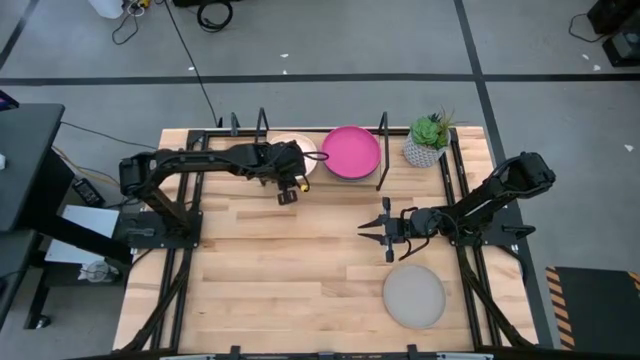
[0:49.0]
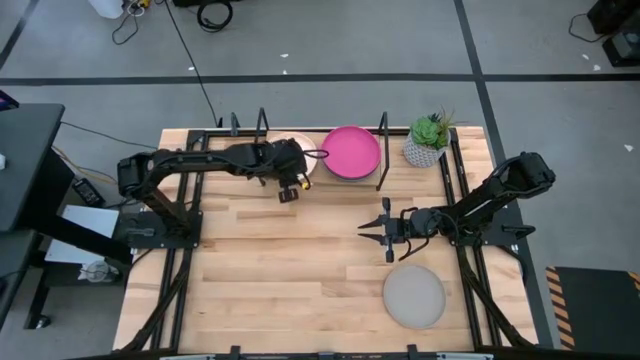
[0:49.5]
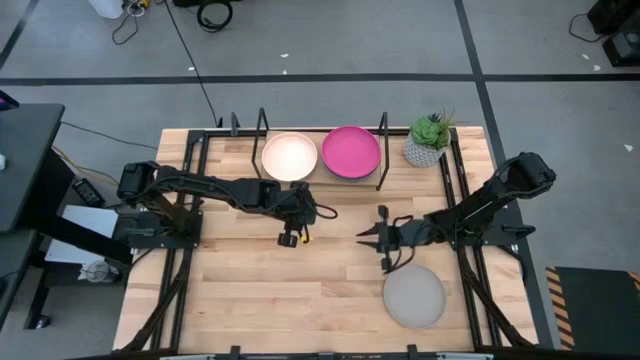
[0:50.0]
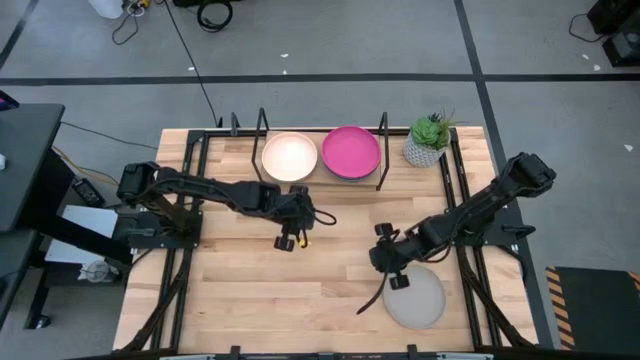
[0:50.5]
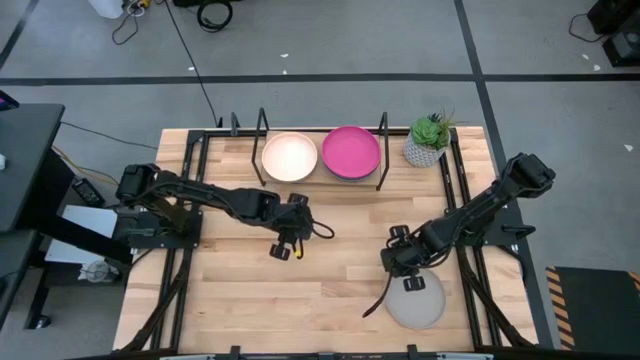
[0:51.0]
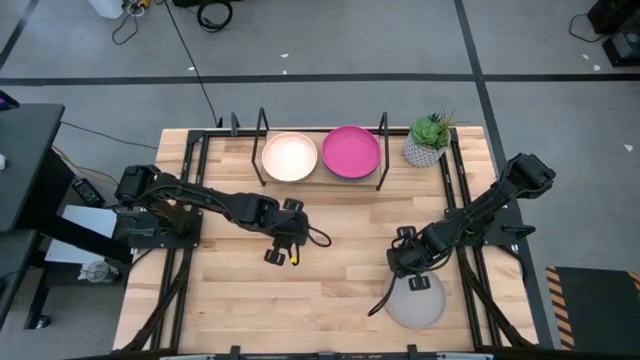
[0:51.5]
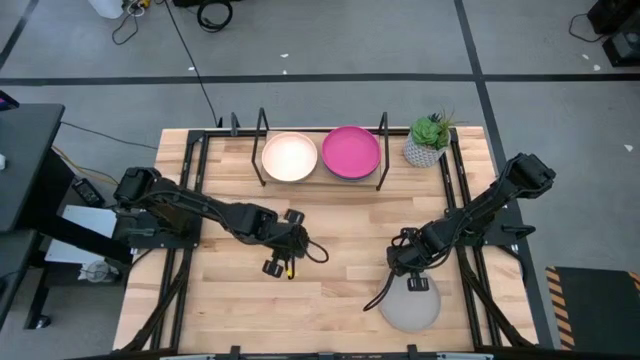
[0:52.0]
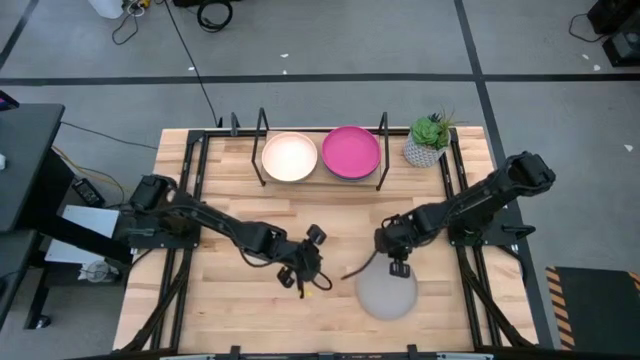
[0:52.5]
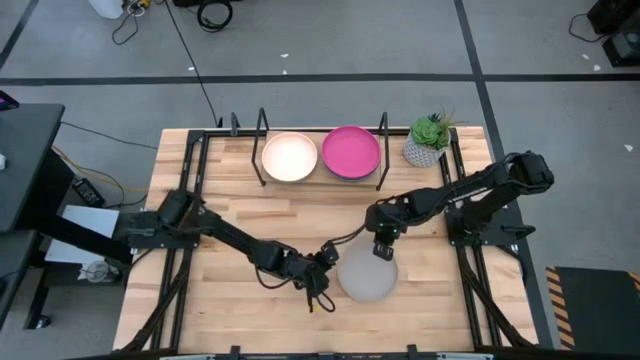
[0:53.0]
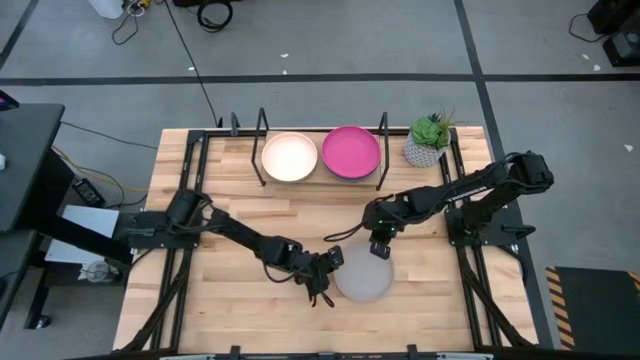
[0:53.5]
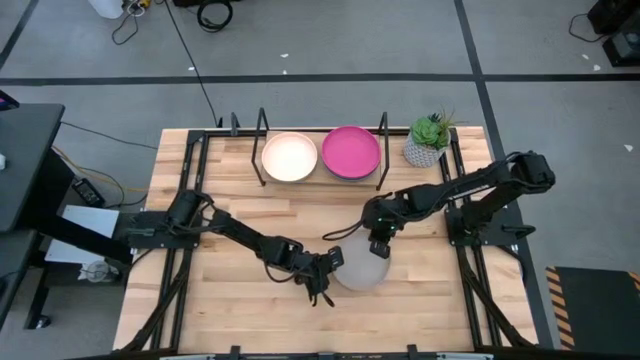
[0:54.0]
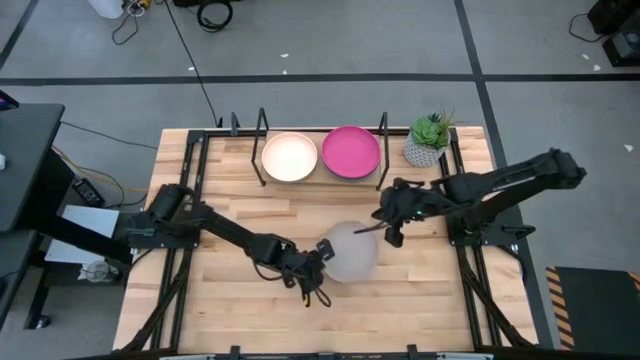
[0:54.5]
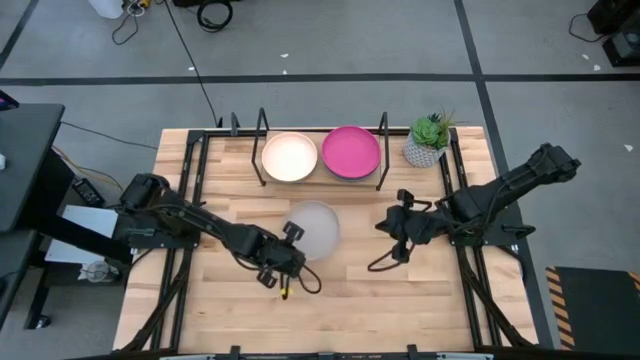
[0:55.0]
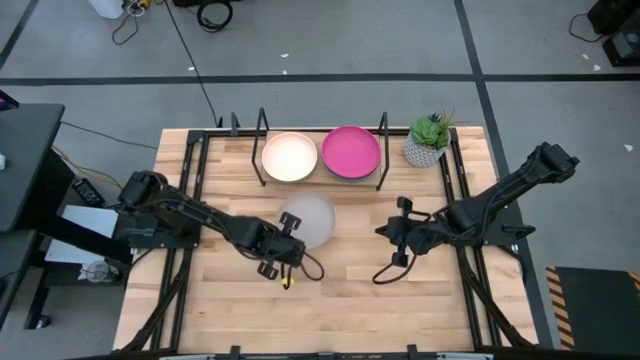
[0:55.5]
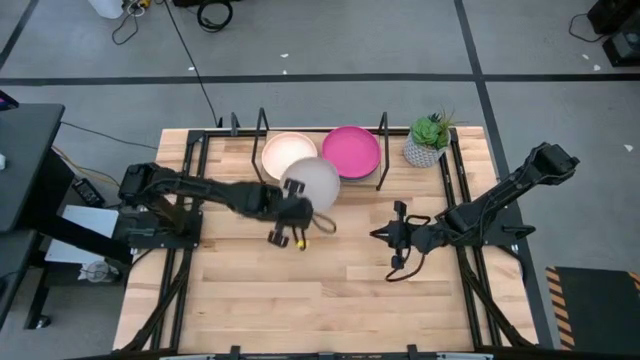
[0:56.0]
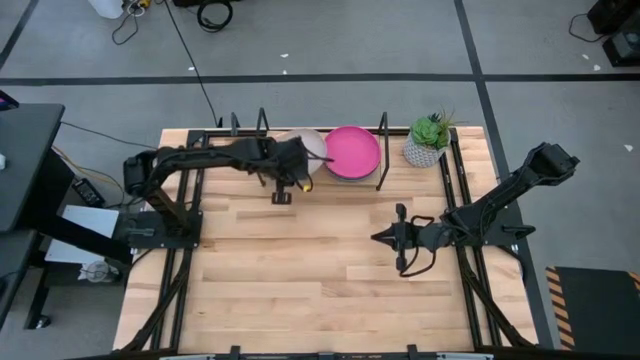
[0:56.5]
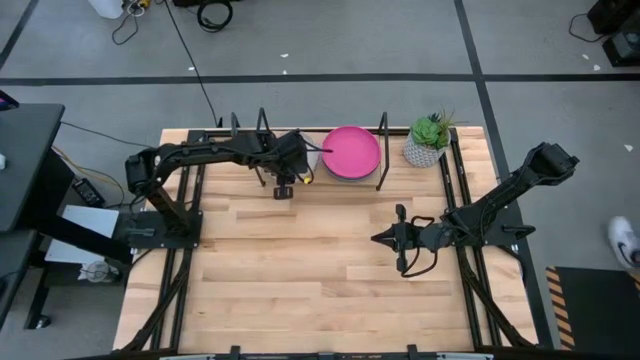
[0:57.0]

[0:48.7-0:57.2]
Task: Place and stack plates onto a shelf
Stack the gray plate onto the white plate

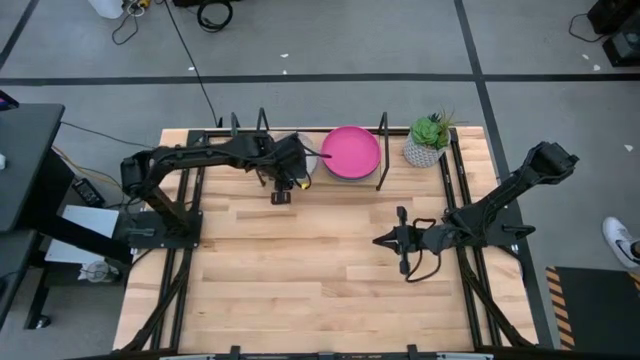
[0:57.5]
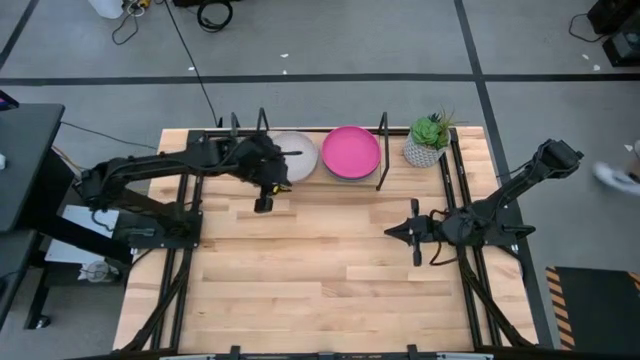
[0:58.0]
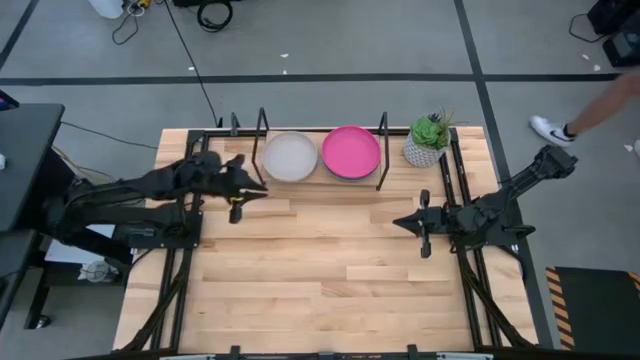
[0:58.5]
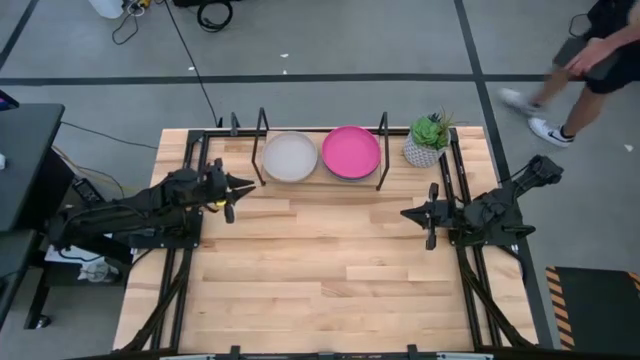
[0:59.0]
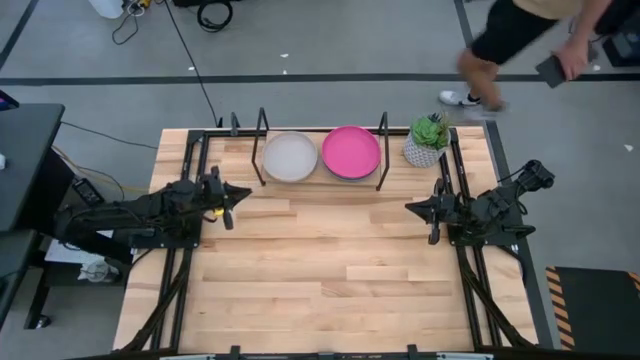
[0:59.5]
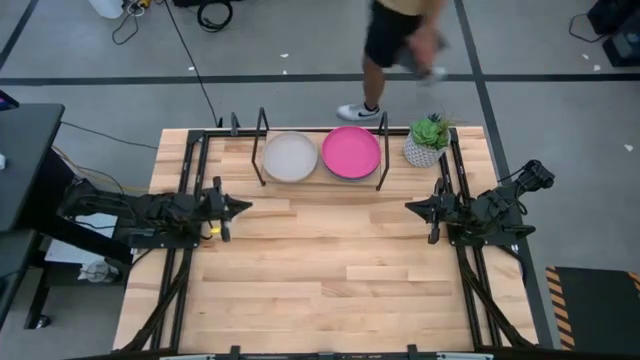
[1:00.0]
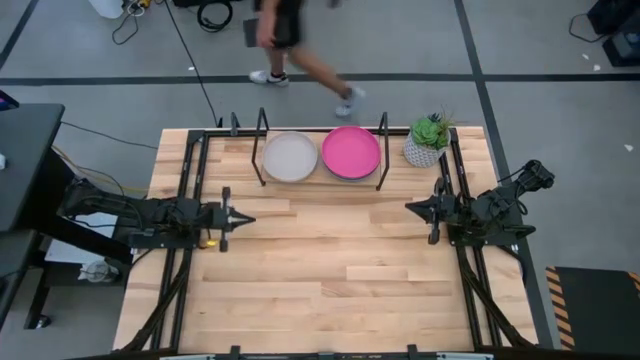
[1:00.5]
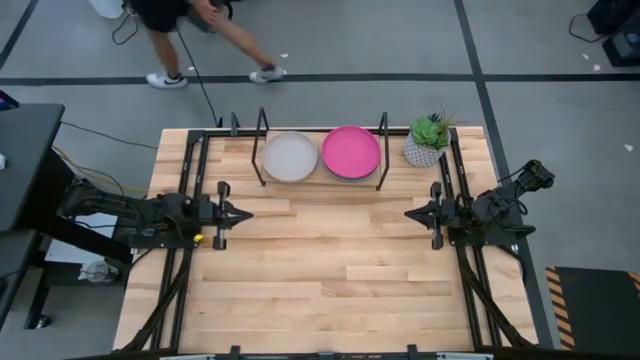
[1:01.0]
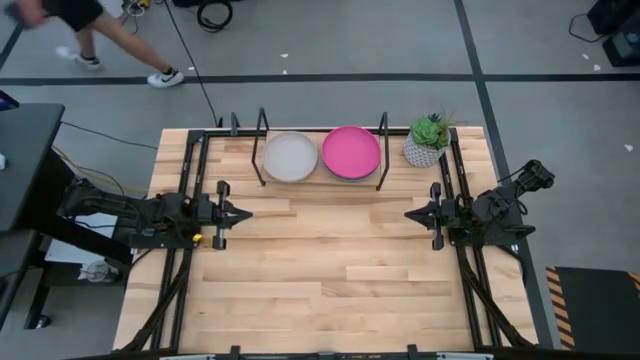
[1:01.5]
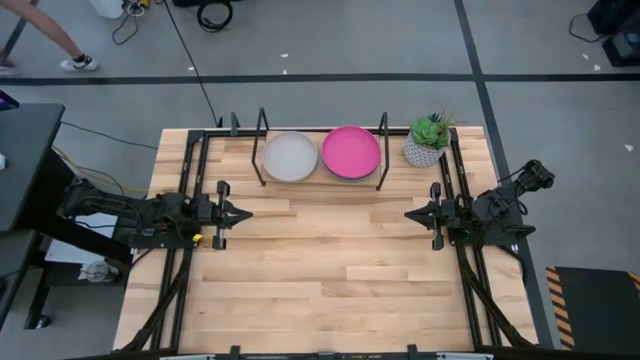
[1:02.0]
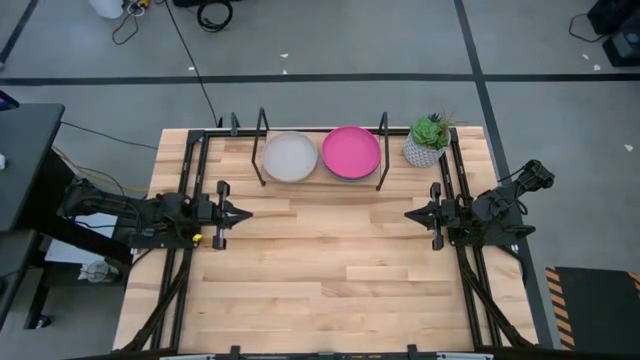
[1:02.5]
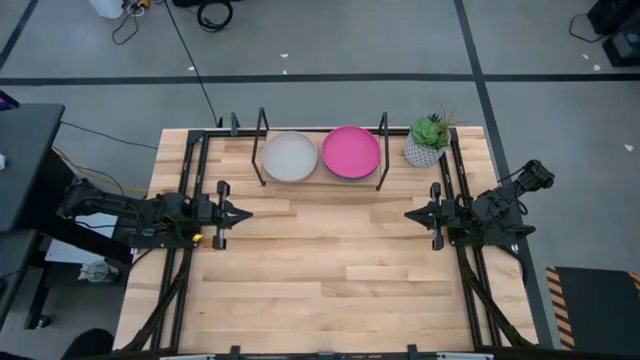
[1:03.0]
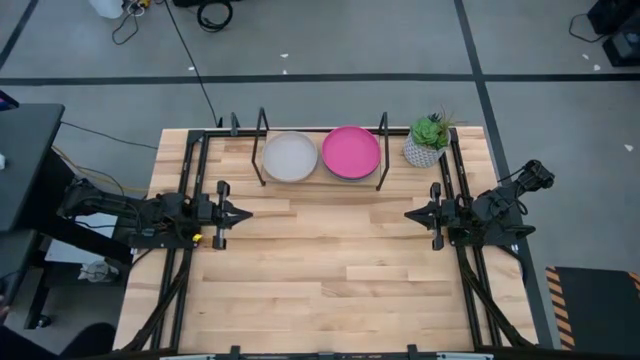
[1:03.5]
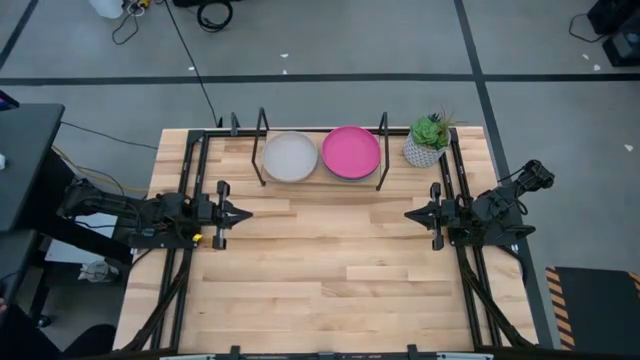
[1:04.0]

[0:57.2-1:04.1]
Return to Home Position

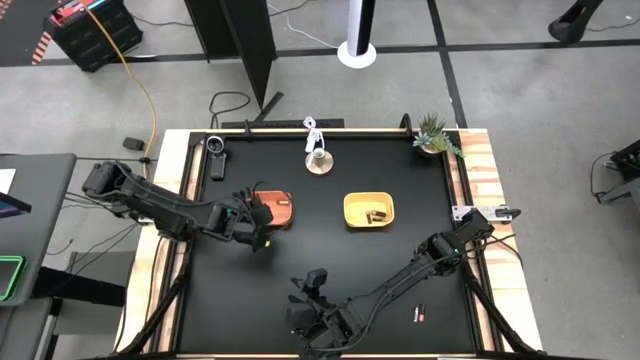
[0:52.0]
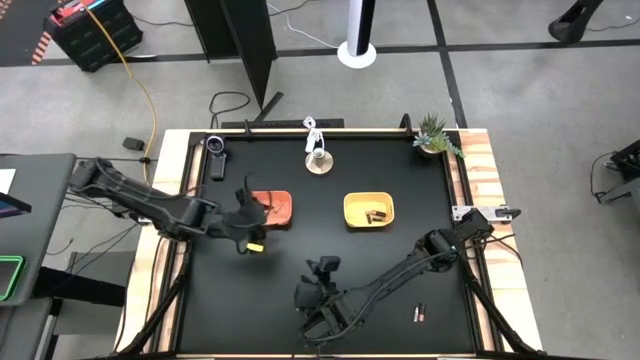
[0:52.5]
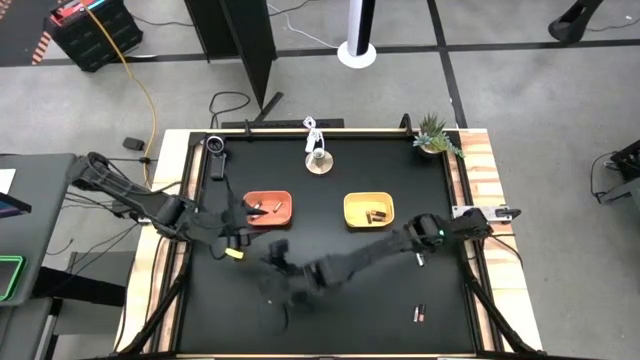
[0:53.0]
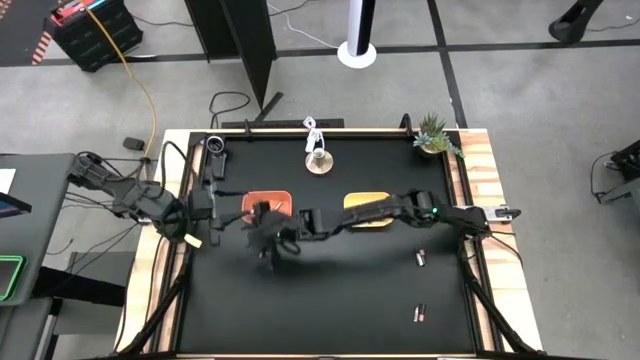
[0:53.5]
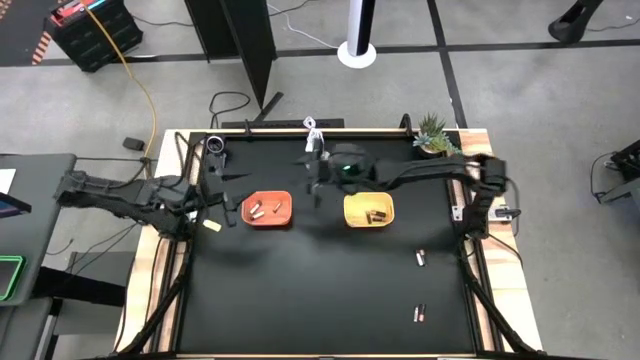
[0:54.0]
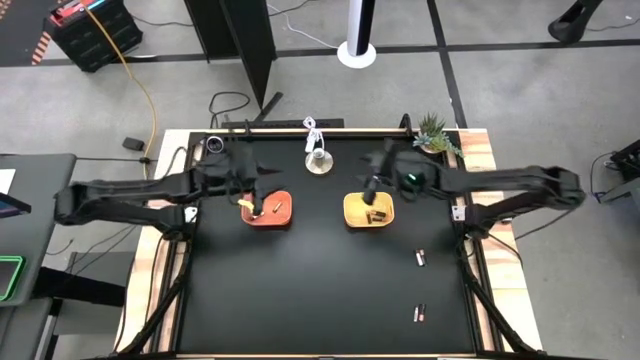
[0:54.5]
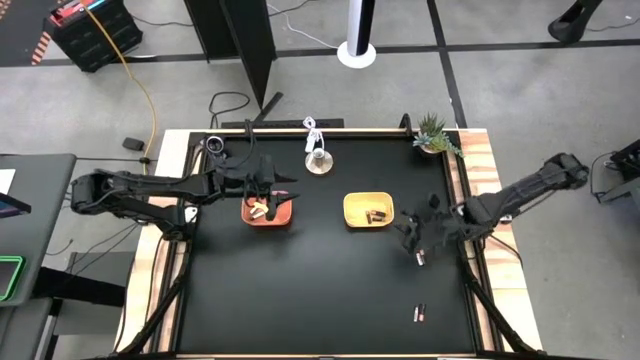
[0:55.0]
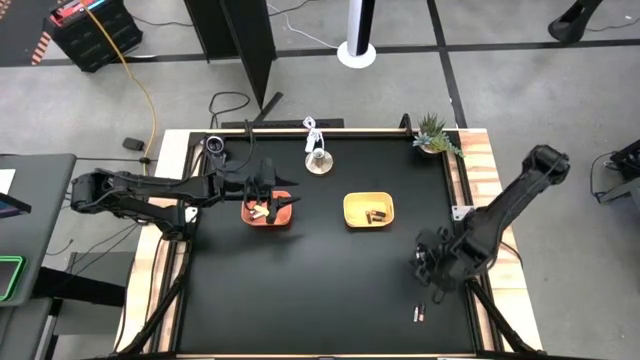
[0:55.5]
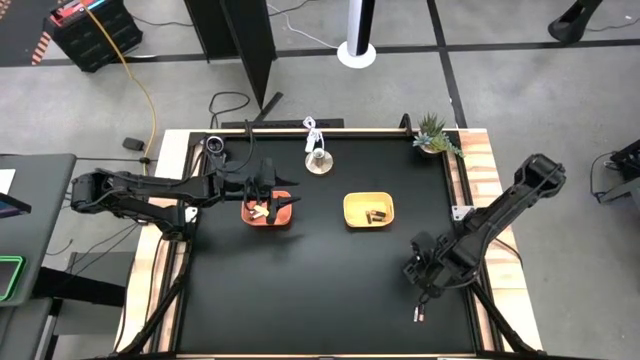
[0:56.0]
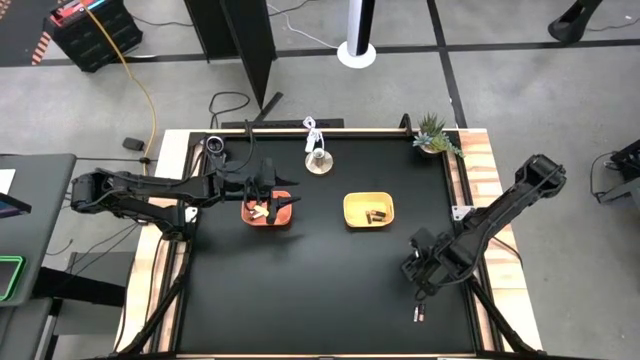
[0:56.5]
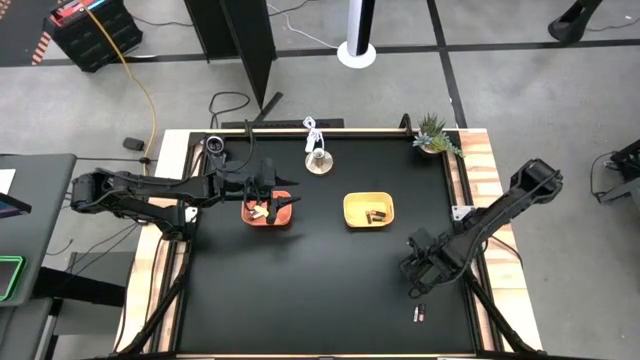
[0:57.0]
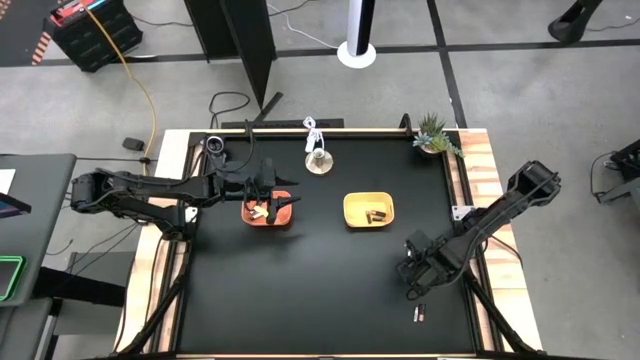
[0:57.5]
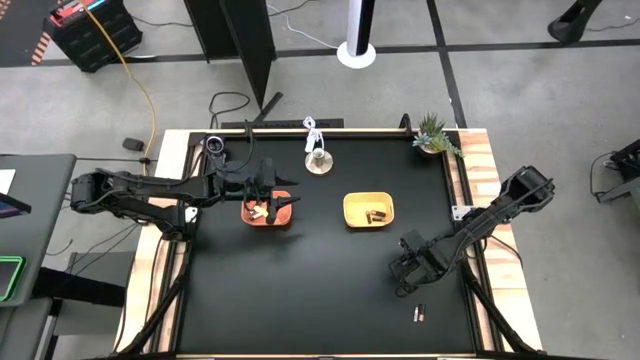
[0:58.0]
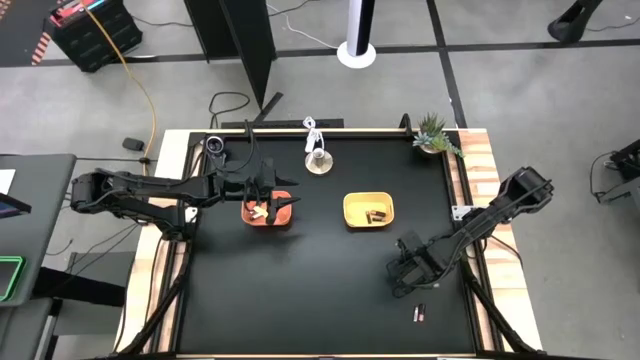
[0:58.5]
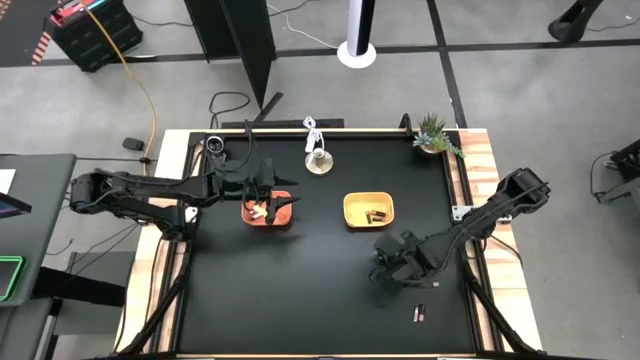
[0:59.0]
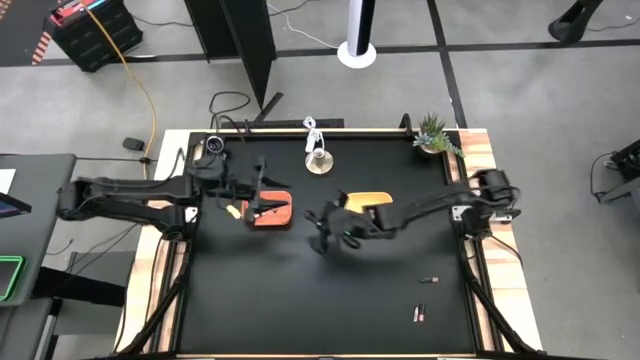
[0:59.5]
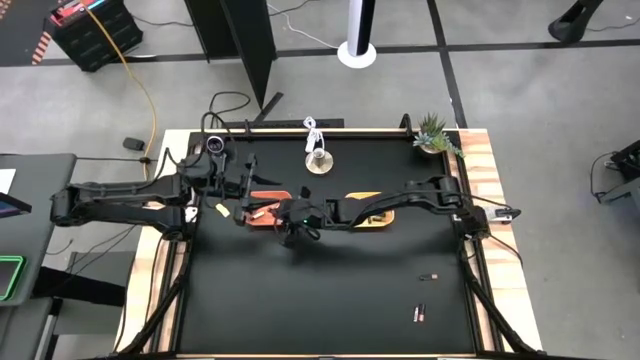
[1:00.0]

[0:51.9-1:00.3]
Task: Sort batteries
Put the silver battery into the orange bin
